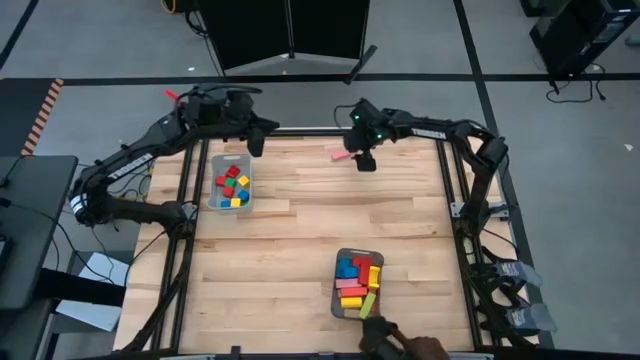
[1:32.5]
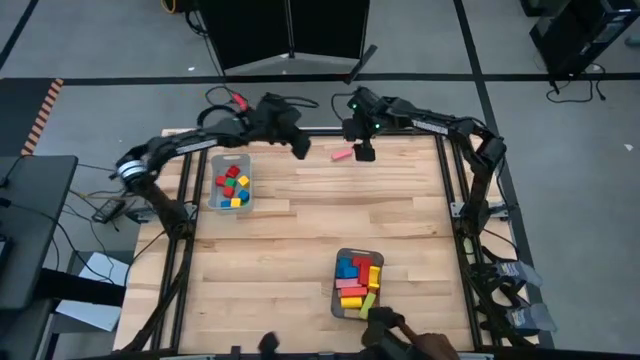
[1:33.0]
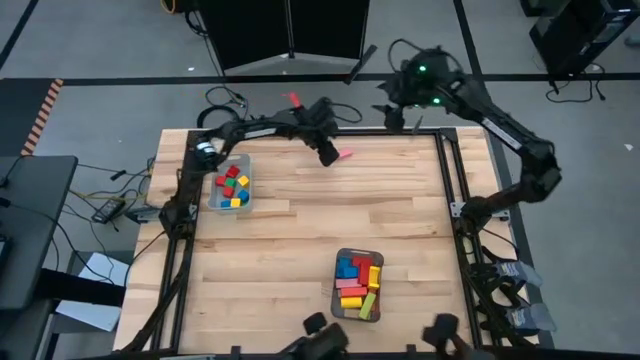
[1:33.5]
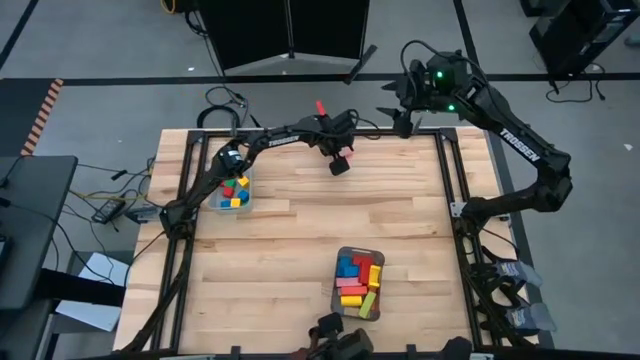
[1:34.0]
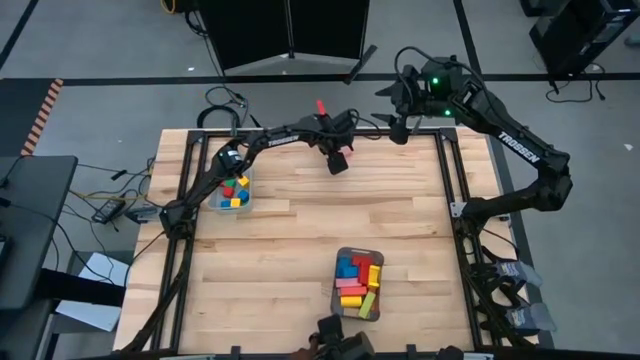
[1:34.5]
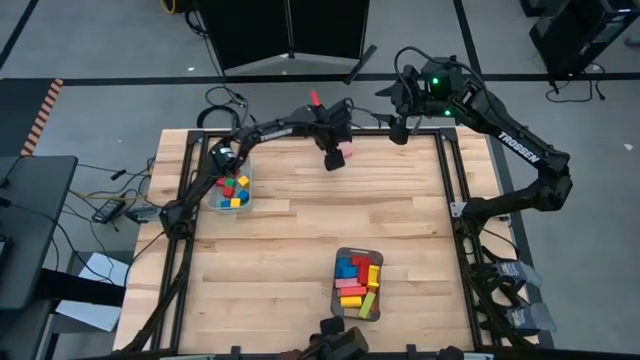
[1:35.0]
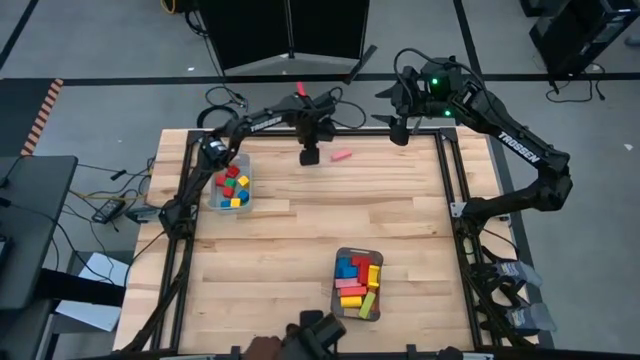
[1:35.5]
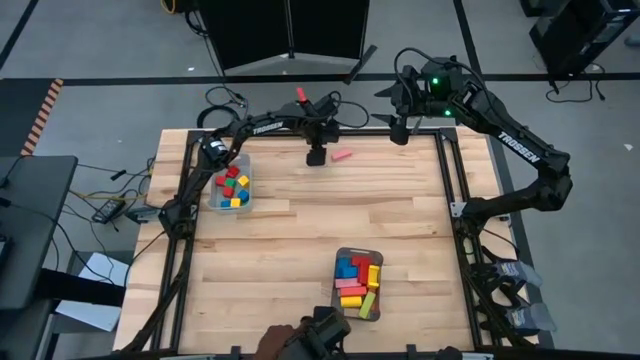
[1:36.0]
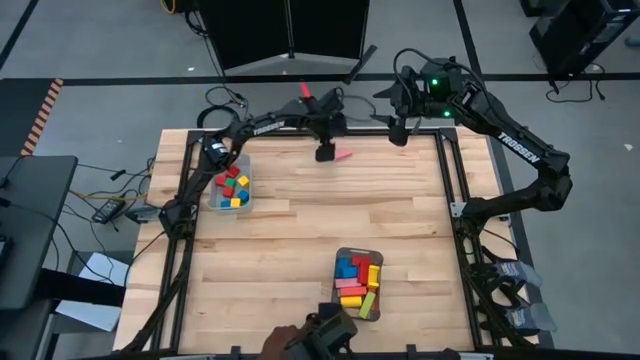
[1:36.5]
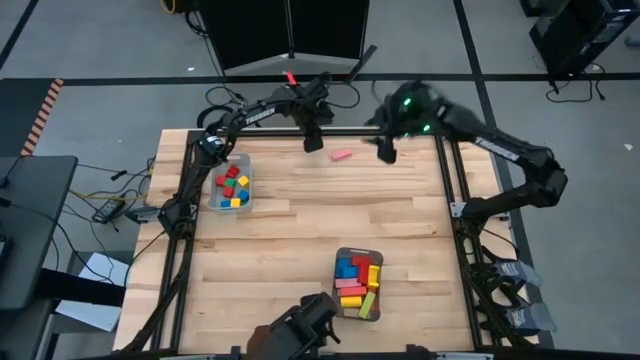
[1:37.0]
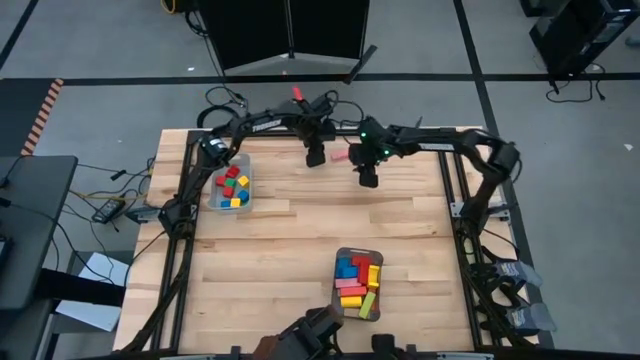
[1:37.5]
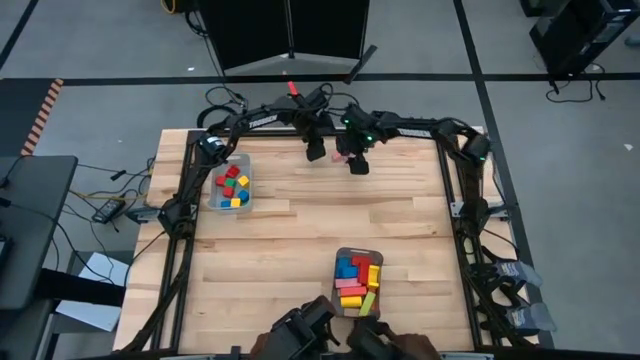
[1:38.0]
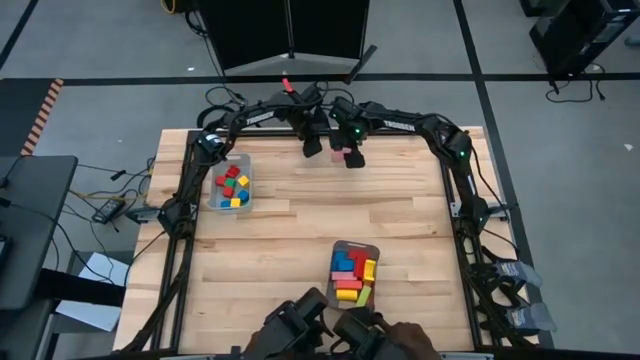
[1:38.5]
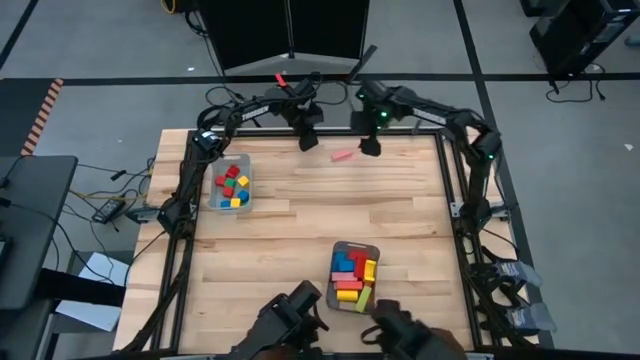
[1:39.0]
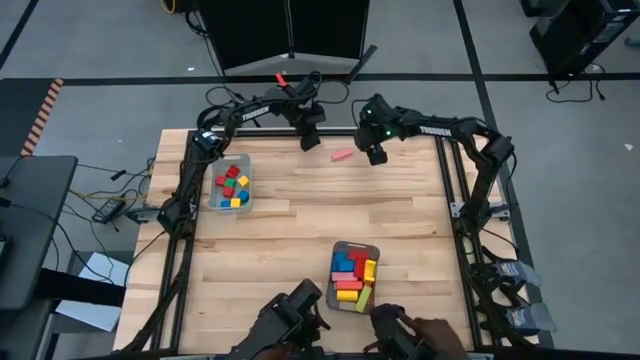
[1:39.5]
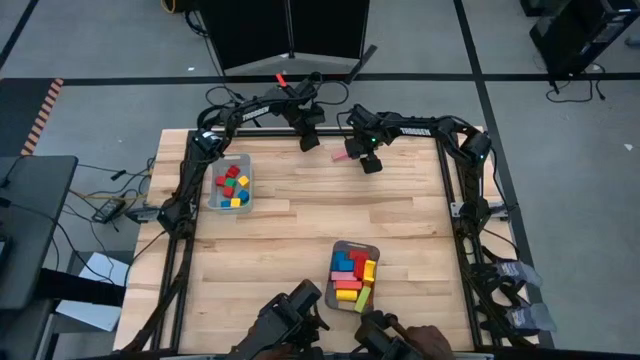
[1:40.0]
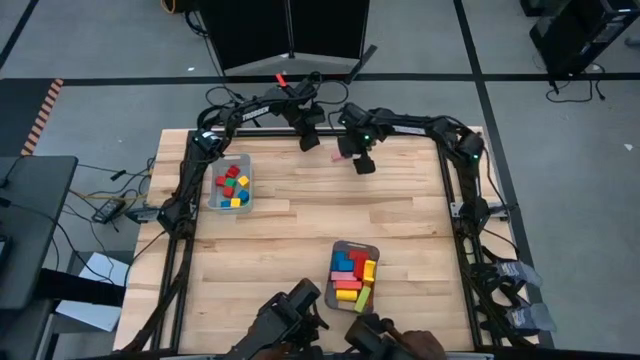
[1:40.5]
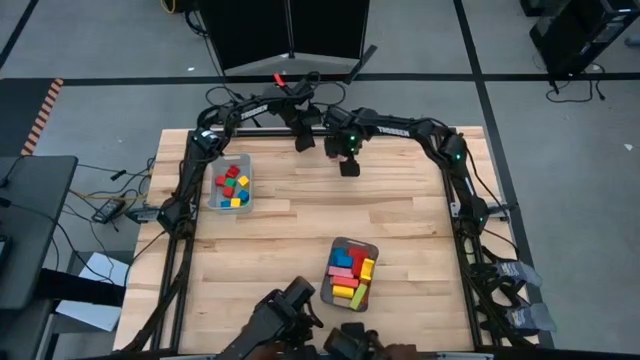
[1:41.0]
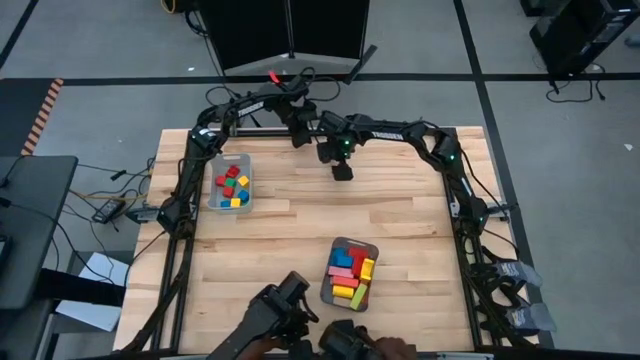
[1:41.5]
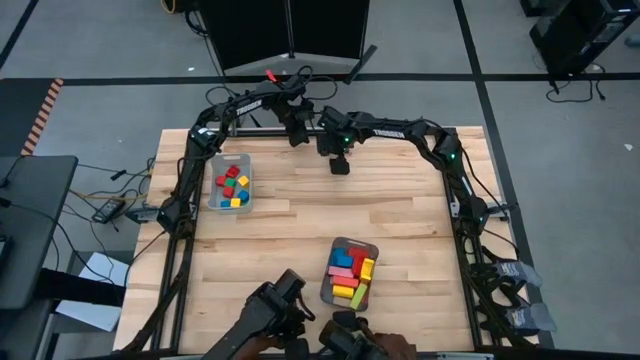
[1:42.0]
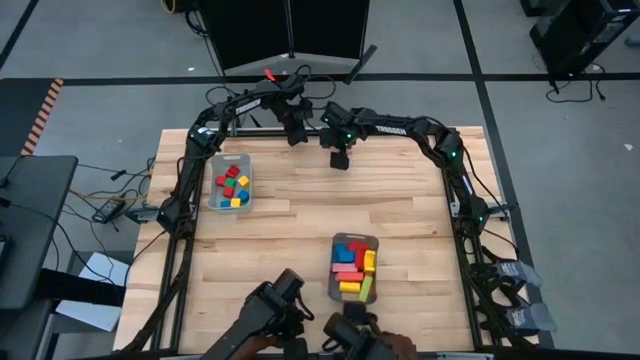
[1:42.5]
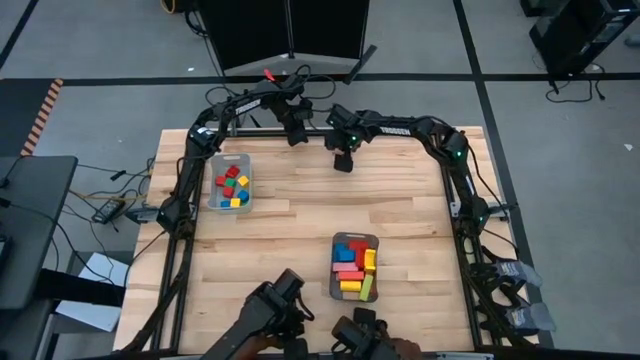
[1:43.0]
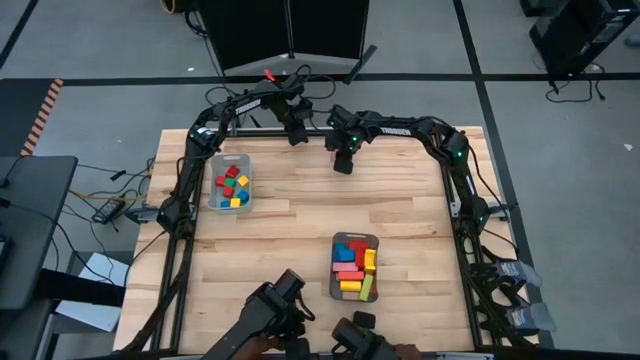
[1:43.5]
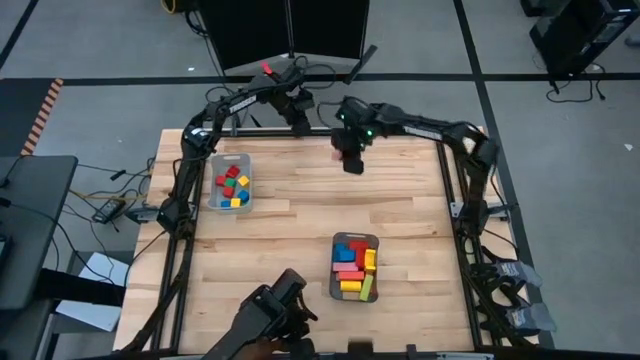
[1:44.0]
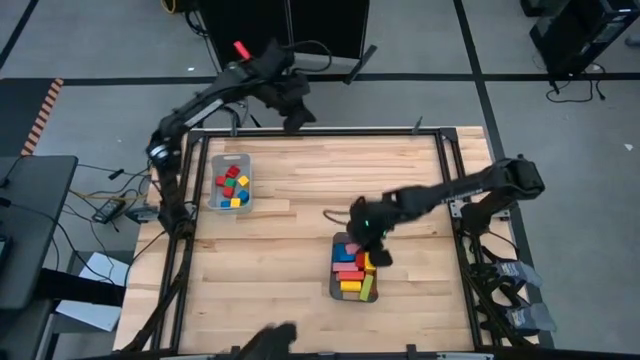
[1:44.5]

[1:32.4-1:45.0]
Task: Sort blocks by size
Put the pink rectangular block into the black bin

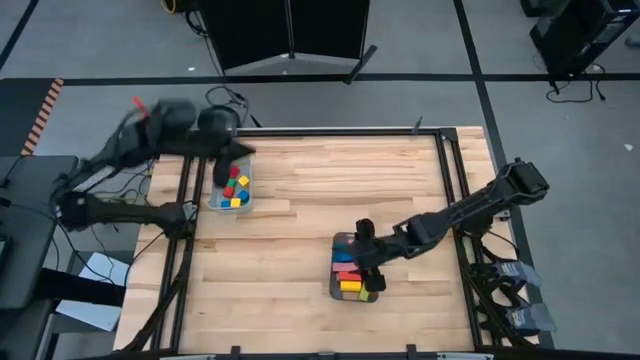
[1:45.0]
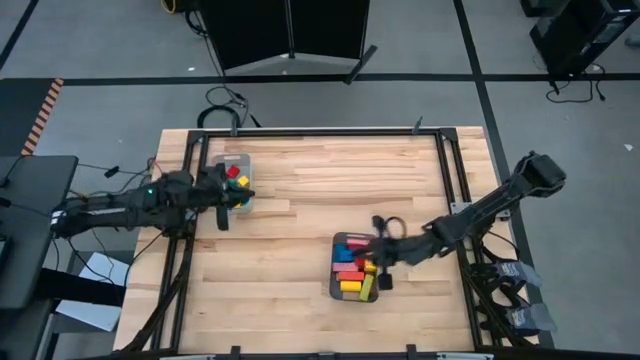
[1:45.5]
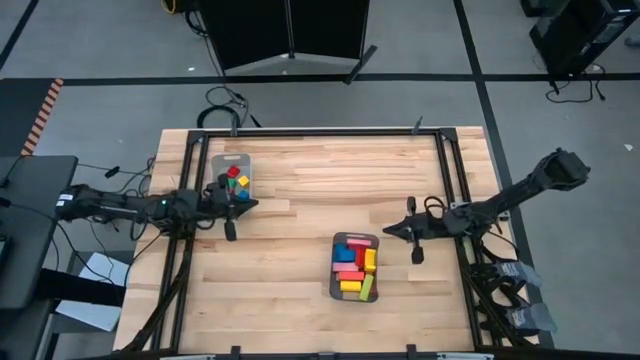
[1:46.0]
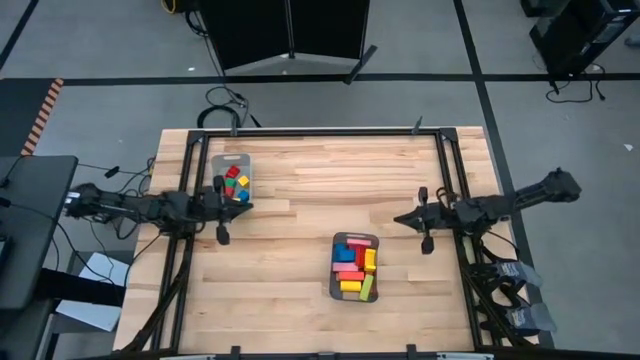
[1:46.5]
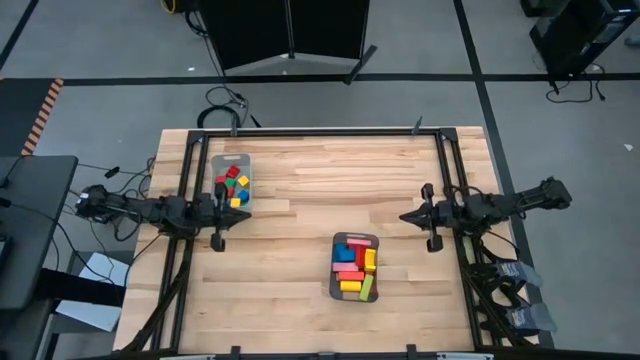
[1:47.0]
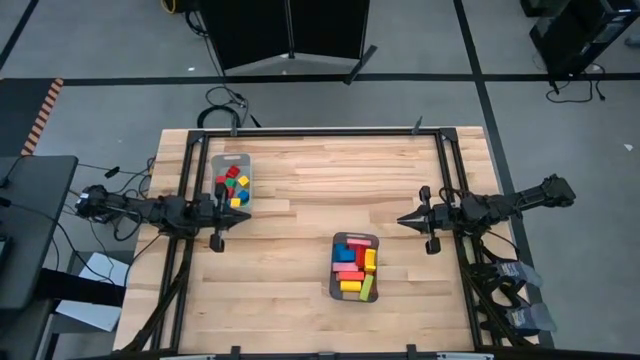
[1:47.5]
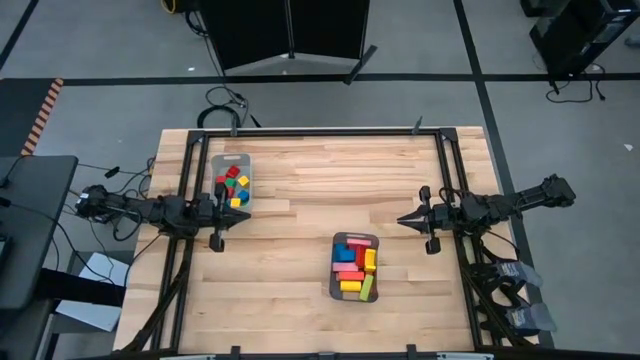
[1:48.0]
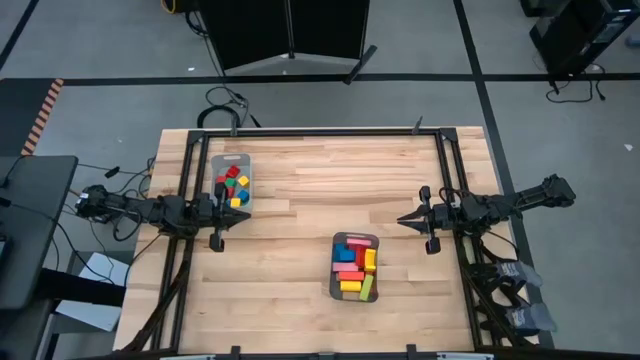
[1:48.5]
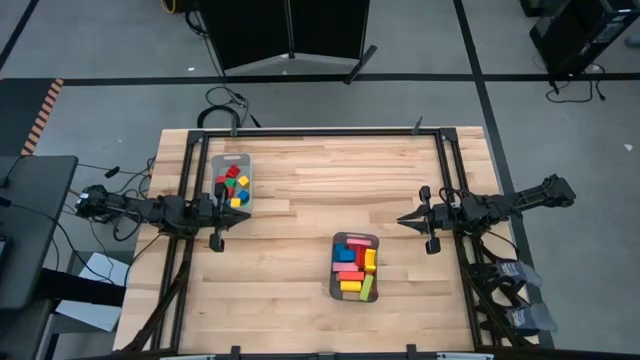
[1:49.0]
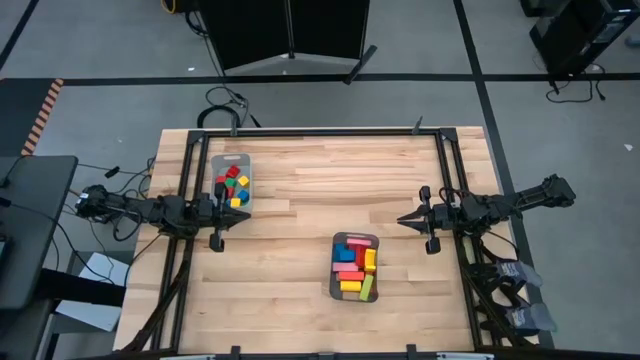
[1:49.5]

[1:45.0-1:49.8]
Return to Home Position

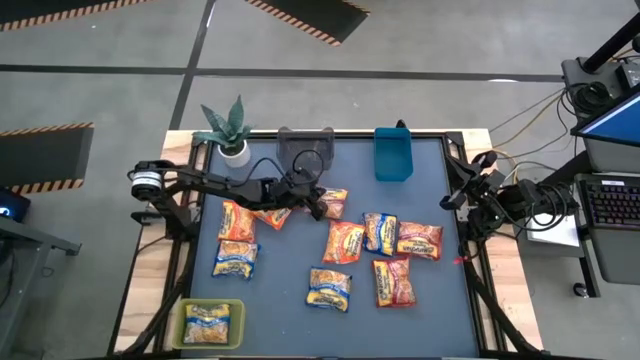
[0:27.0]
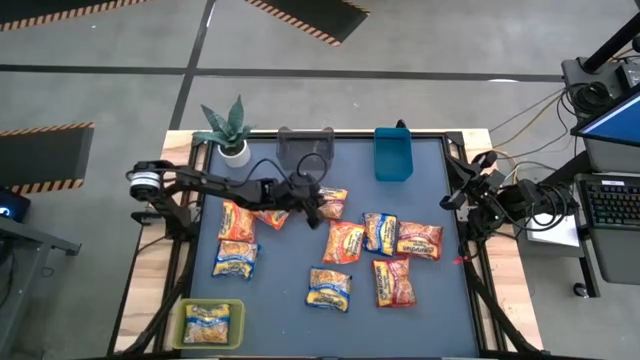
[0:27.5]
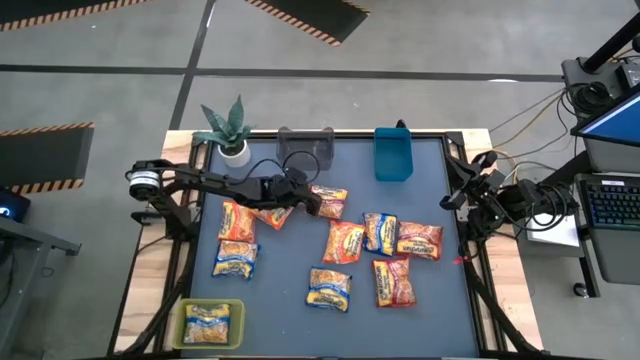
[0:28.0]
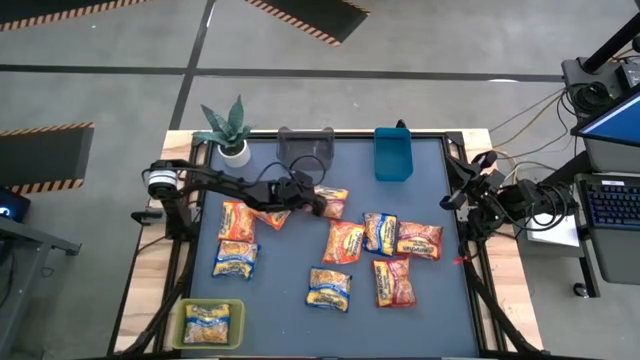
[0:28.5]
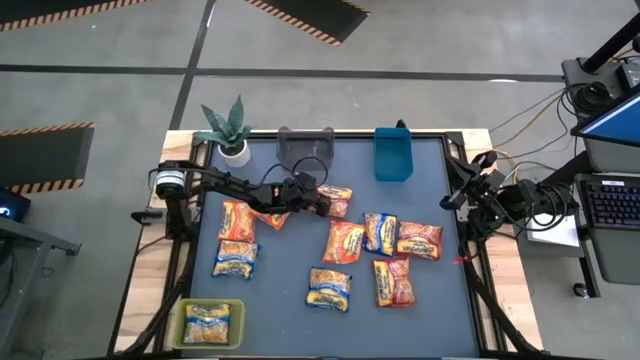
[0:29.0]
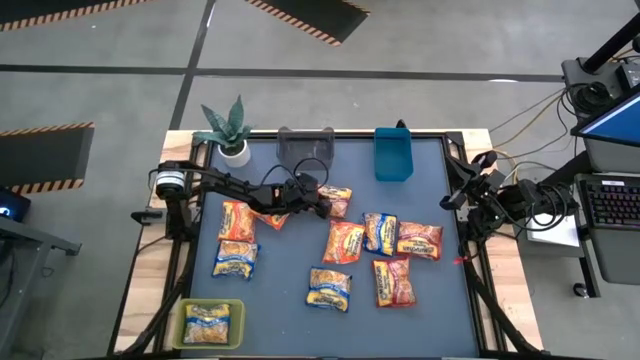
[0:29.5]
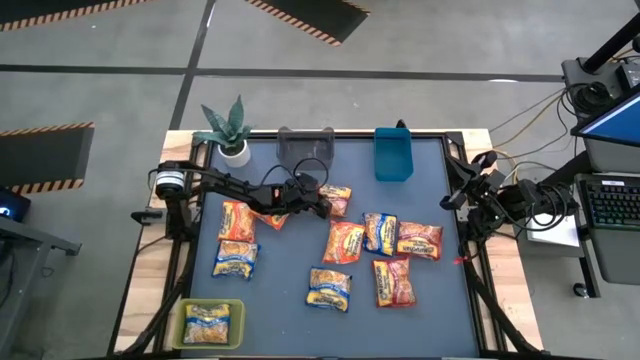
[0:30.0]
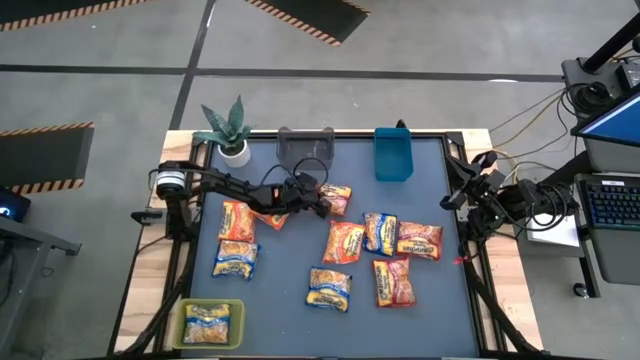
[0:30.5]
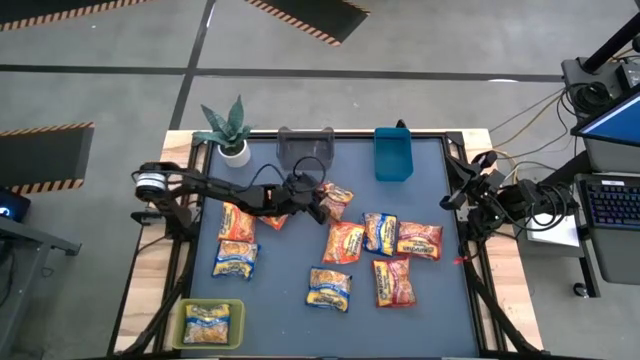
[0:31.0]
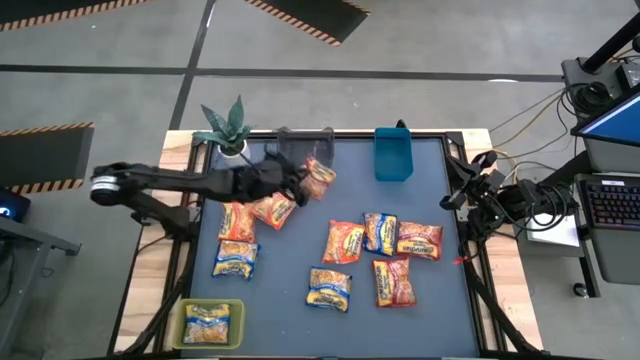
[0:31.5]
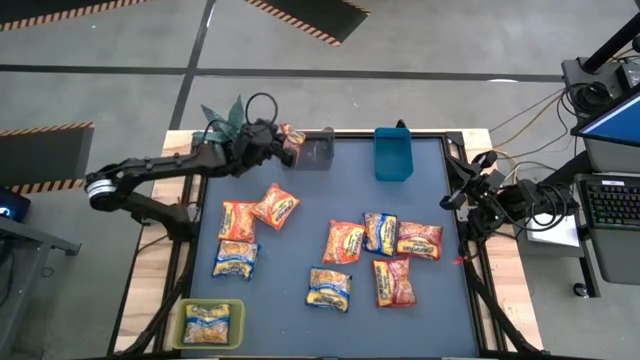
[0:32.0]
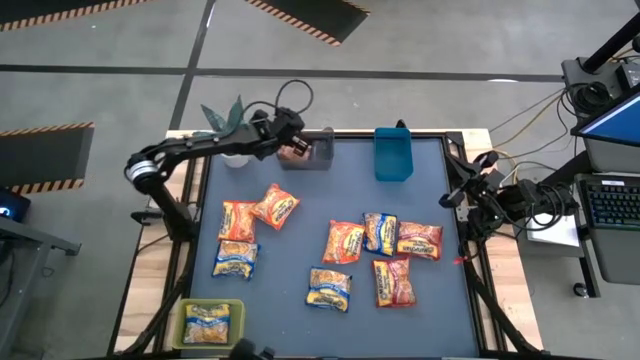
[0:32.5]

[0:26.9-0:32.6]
Task: Sort Maruchan noodles
Put the top left red noodle pack into the black bin
